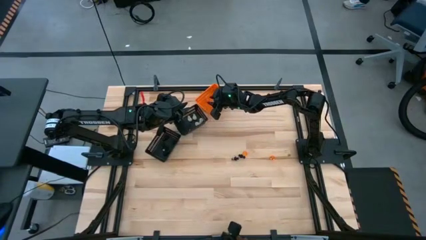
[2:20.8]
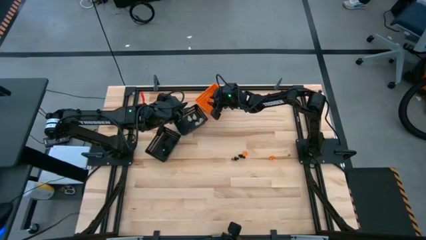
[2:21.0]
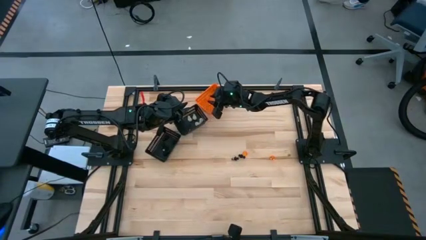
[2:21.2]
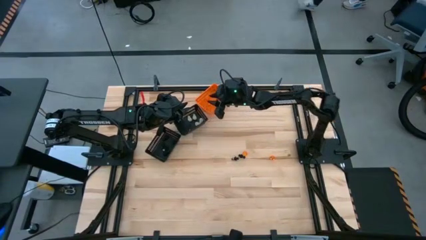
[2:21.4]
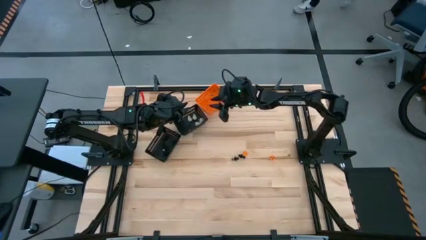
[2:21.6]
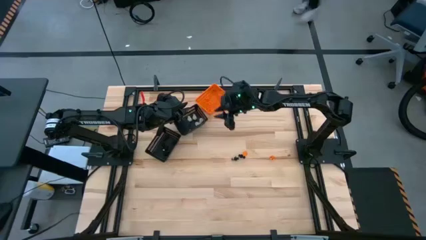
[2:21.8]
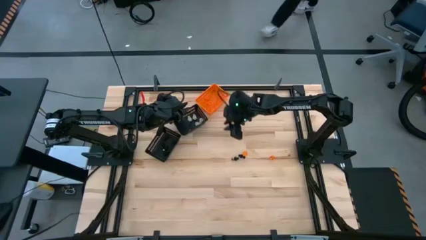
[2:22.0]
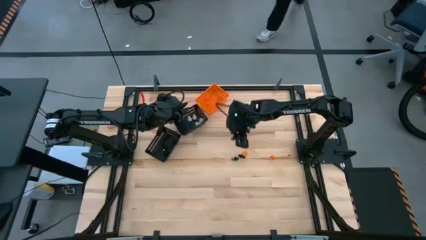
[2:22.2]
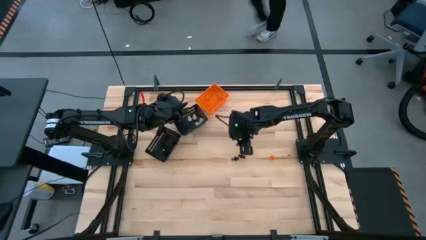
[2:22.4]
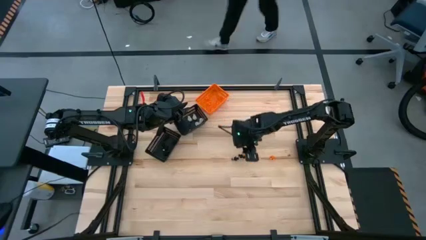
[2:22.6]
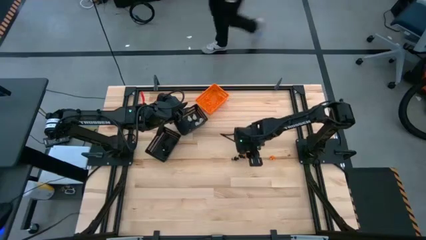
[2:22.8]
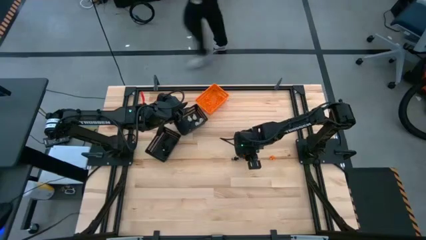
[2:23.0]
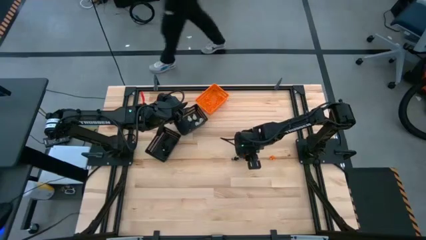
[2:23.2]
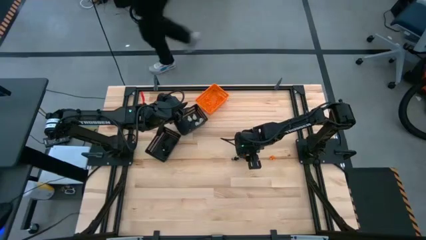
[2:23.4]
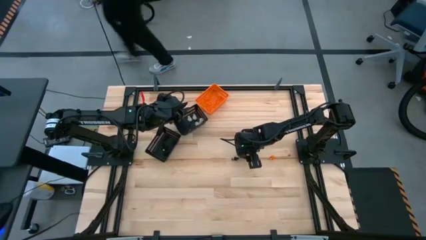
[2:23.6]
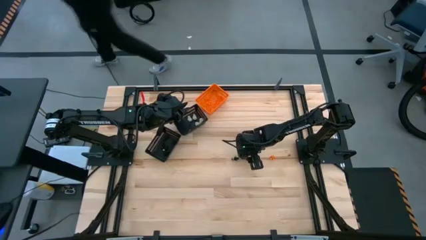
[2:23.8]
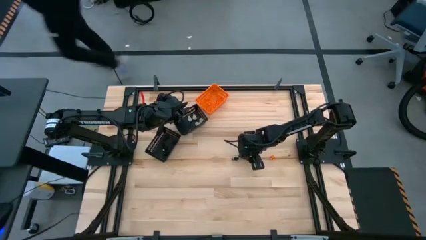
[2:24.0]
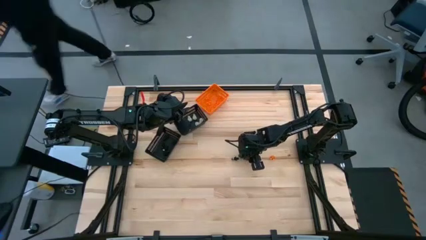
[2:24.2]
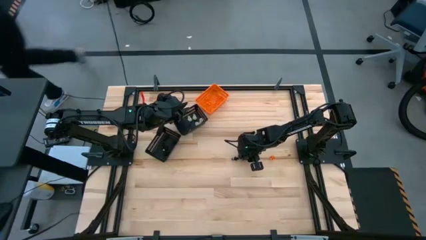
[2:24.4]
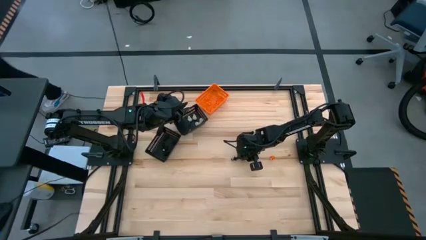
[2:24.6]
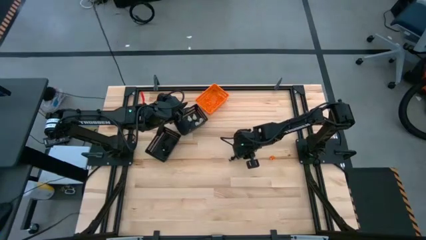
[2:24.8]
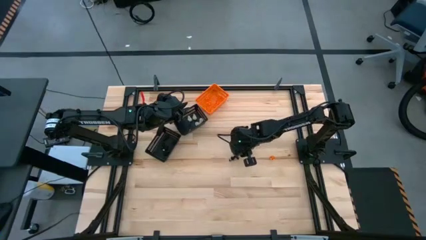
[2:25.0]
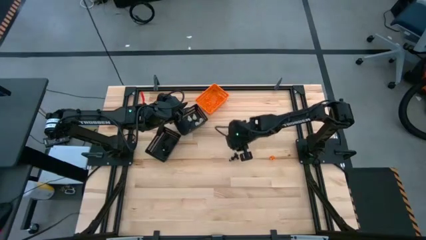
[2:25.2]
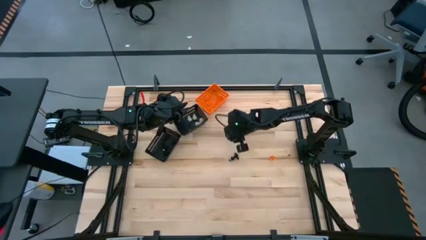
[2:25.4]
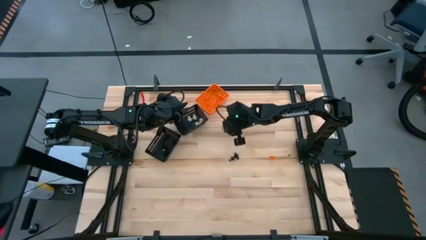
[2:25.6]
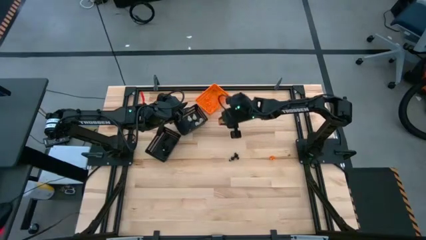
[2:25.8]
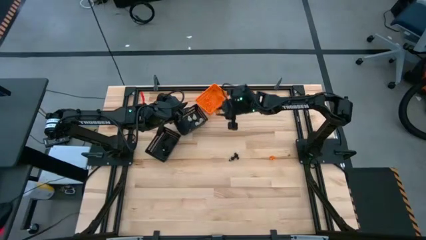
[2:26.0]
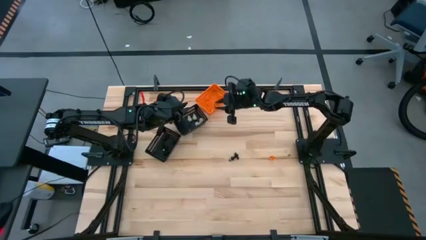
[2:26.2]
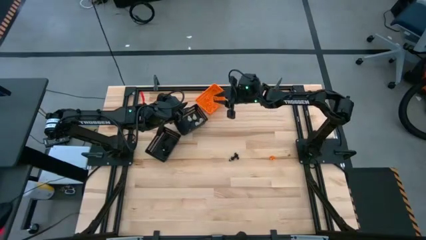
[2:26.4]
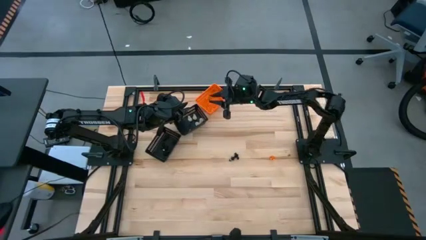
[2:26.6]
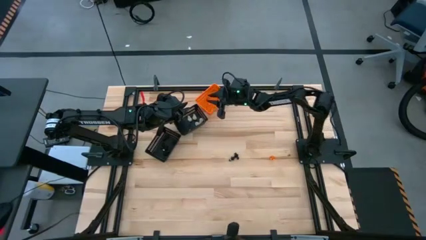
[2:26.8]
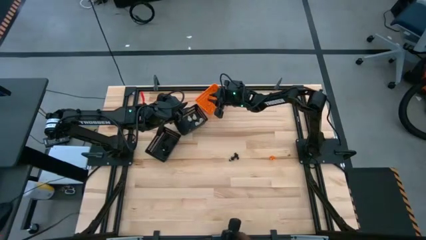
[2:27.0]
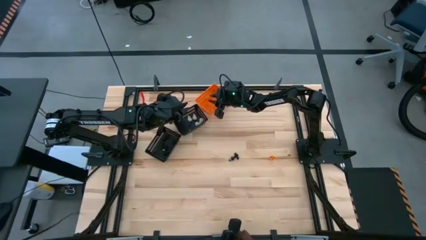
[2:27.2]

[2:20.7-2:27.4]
Task: Sort Halloween decoration
Put the orange pumpkin toy into the orange bin

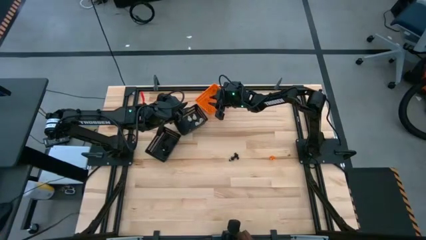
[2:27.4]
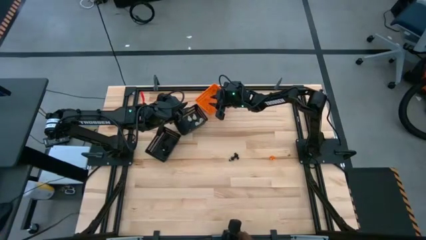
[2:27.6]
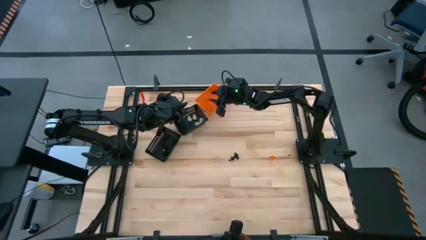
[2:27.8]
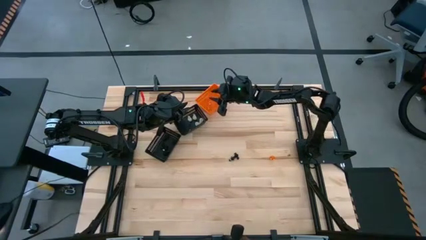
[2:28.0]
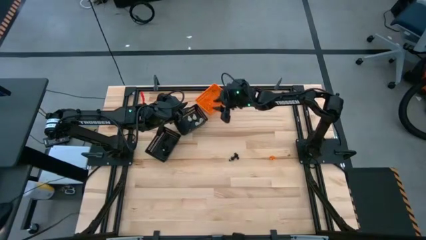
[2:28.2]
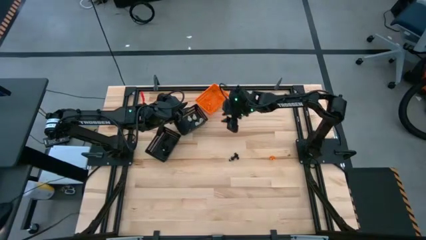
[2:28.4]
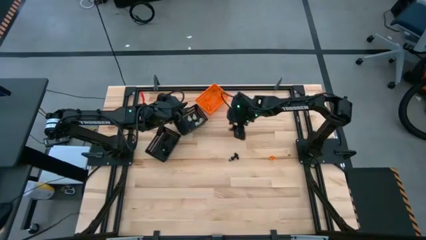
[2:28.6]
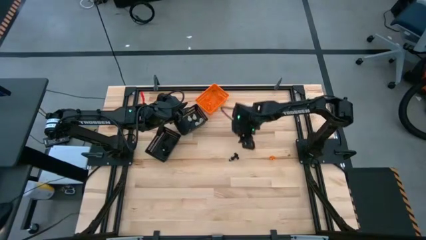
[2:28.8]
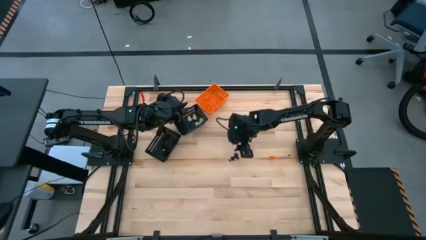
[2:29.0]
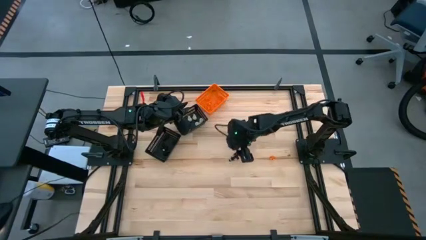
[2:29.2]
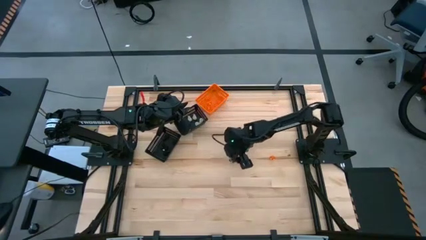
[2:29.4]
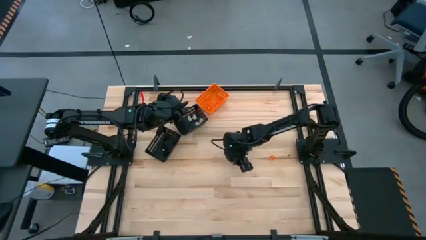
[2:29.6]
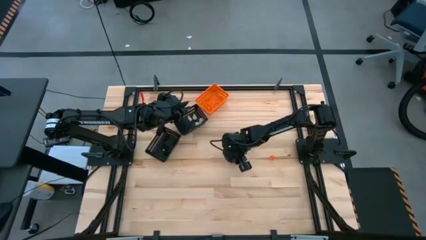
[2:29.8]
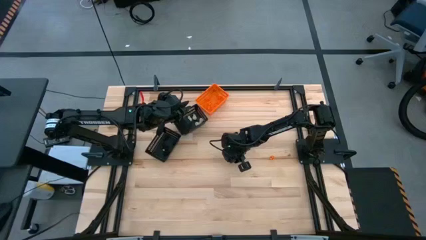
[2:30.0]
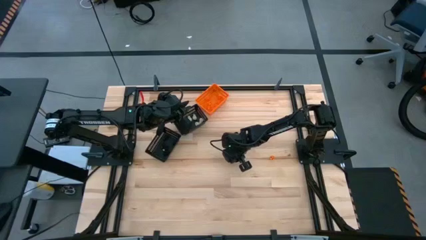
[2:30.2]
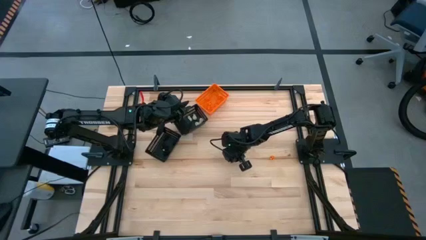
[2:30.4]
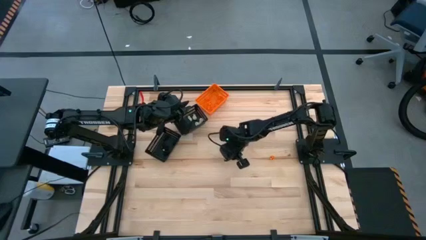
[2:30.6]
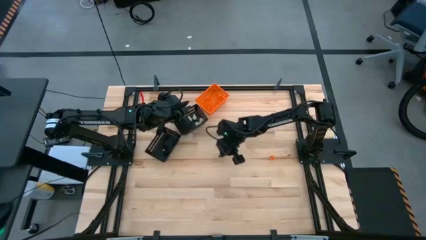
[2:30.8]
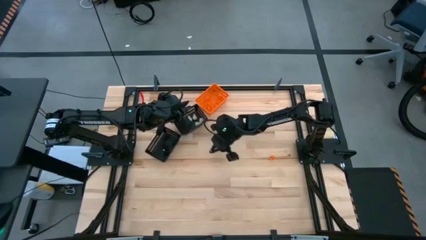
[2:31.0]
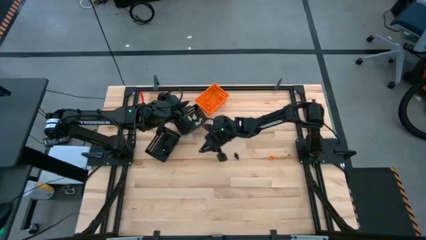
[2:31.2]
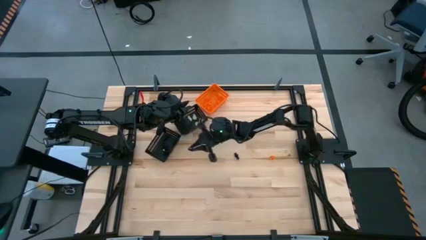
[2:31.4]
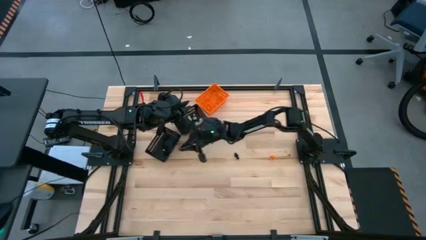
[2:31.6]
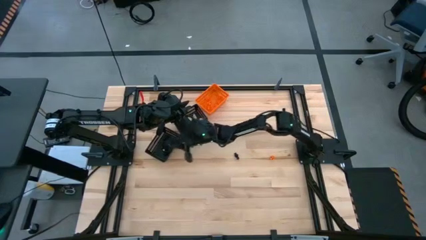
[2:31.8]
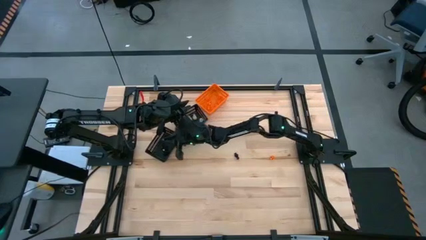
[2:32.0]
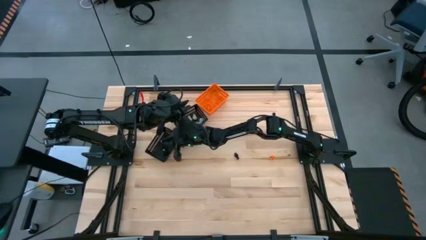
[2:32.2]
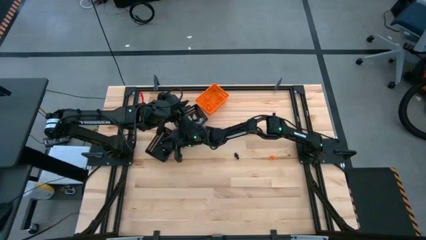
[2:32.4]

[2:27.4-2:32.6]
Put the black voodoo toy into the bottom black bin

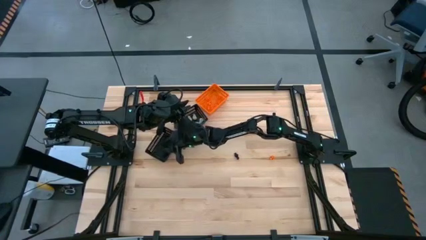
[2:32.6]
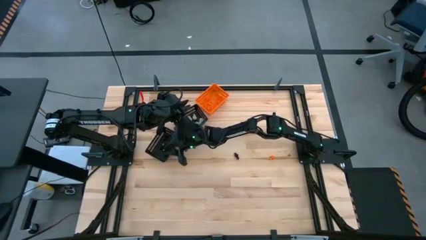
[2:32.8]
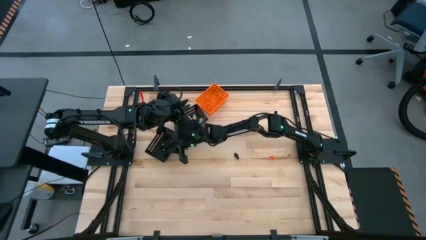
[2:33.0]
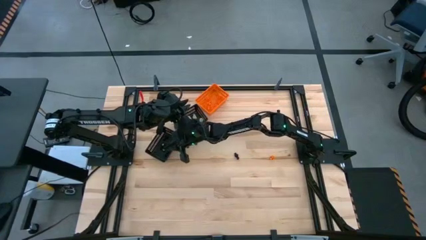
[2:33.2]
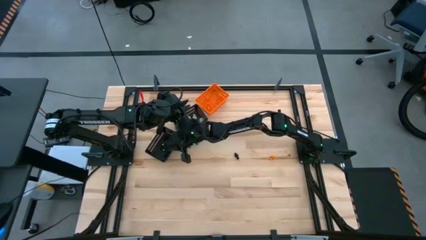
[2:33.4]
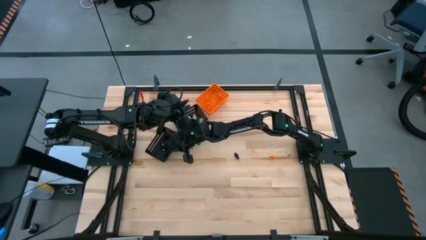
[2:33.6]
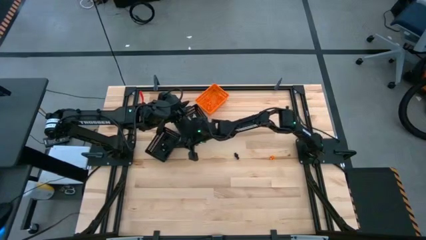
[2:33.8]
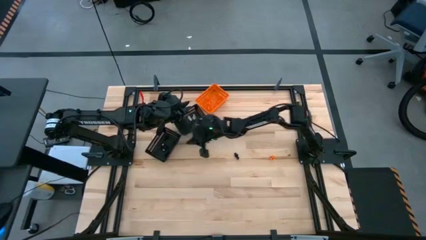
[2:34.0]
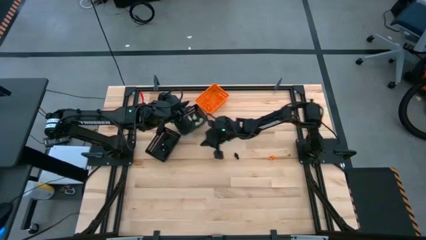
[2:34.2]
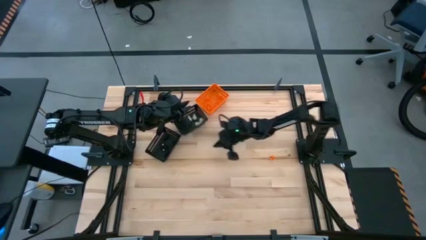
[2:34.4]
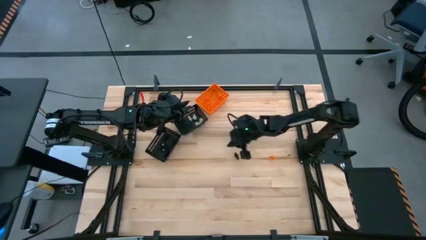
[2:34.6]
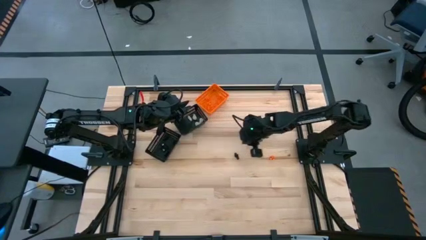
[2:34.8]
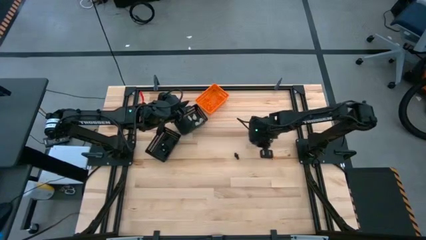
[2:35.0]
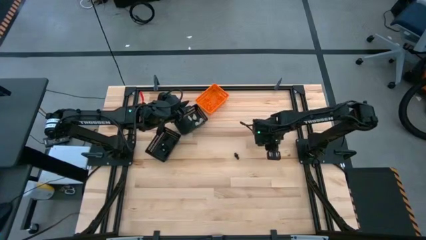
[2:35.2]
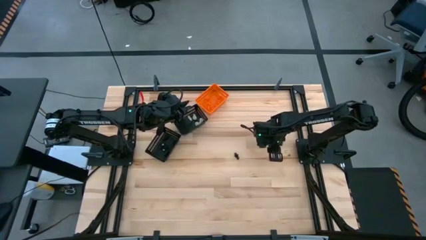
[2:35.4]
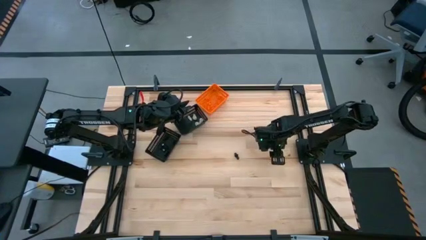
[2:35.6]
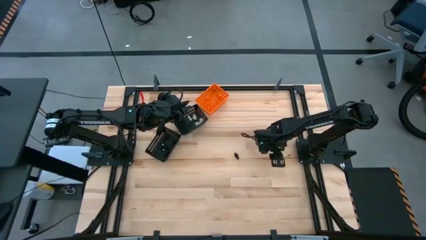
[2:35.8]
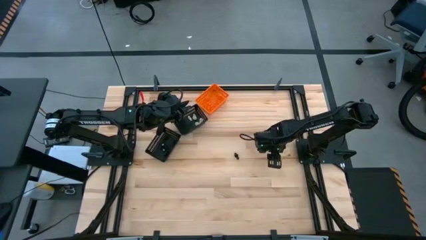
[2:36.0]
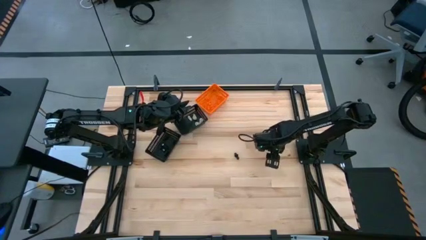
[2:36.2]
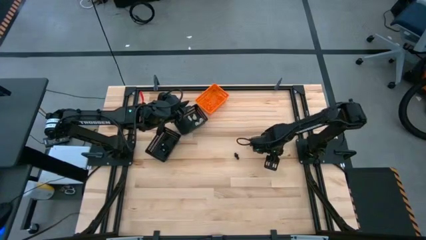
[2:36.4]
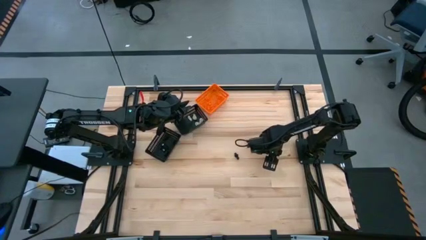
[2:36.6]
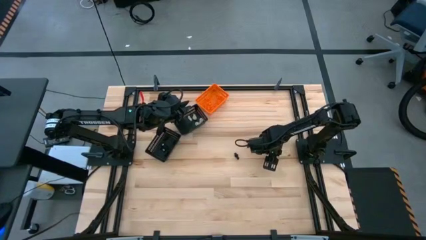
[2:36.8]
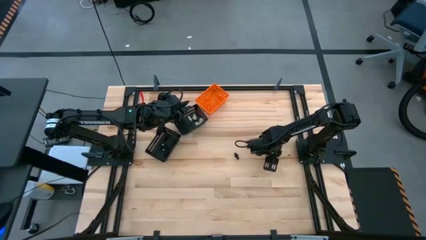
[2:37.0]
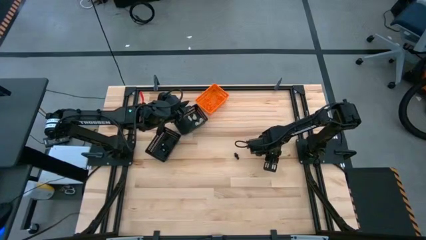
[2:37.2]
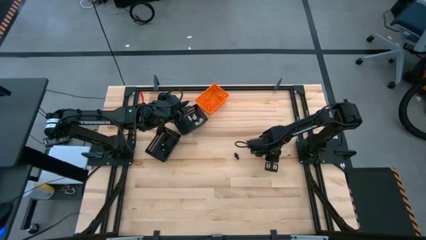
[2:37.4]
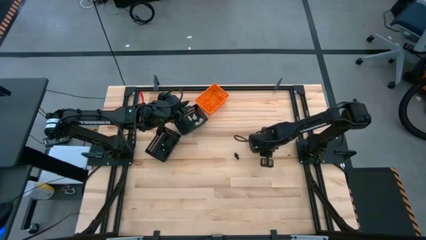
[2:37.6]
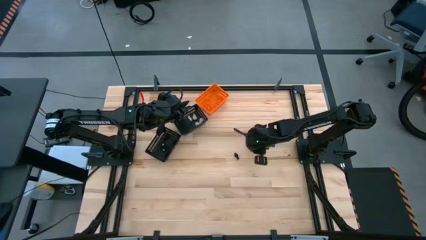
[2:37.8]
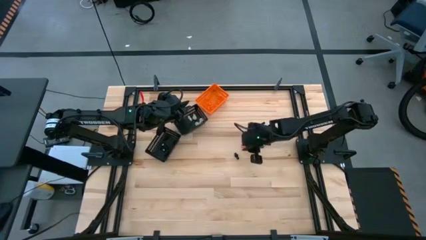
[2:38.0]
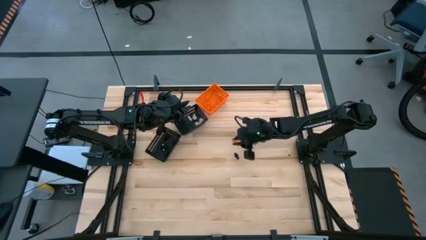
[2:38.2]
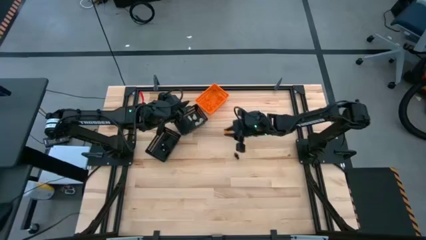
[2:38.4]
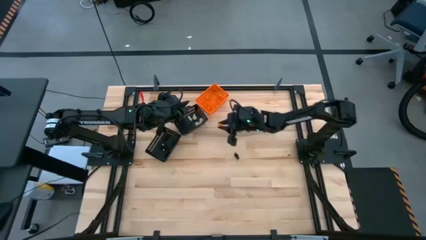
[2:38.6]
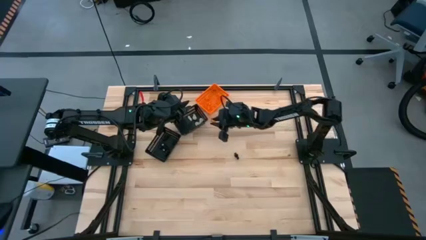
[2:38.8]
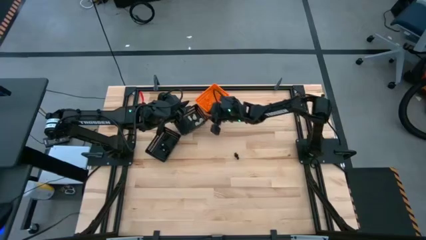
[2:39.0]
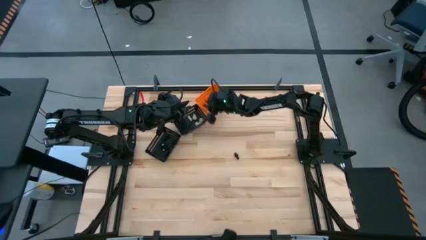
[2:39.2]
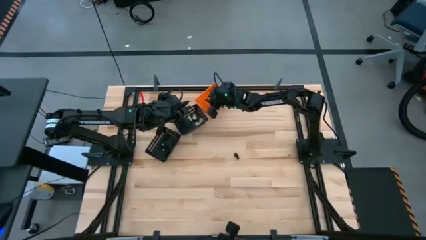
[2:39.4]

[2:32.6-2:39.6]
Put the orange pumpkin toy into the orange bin
